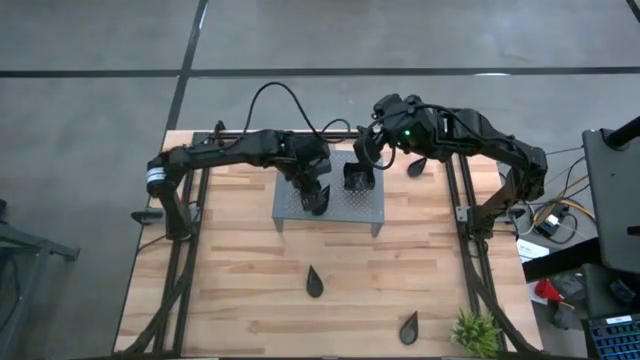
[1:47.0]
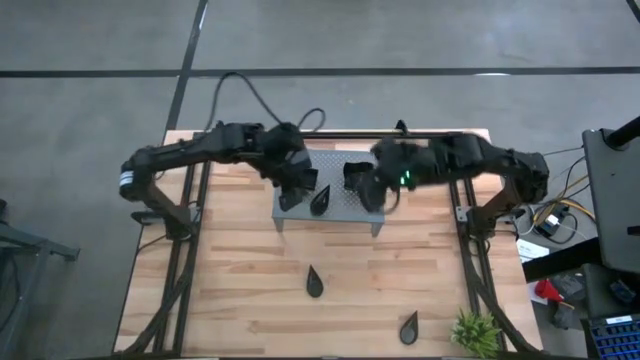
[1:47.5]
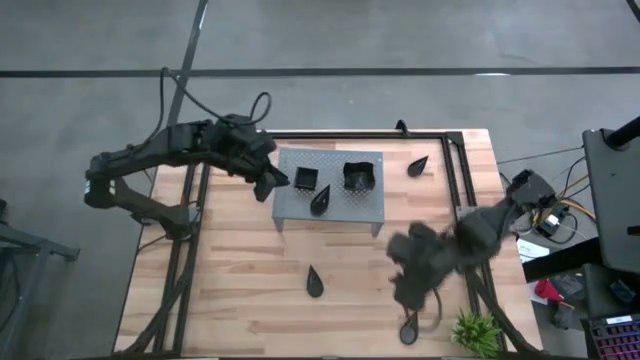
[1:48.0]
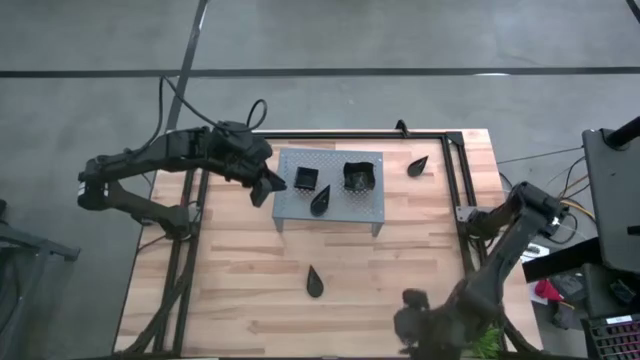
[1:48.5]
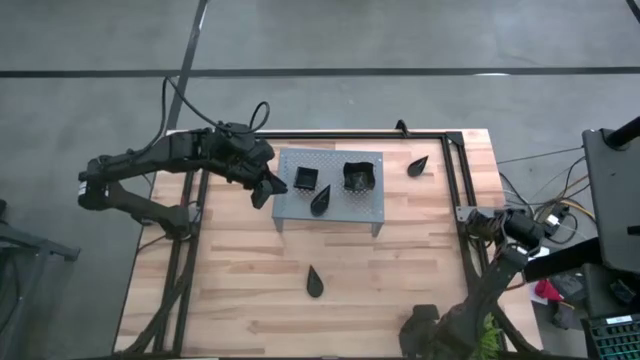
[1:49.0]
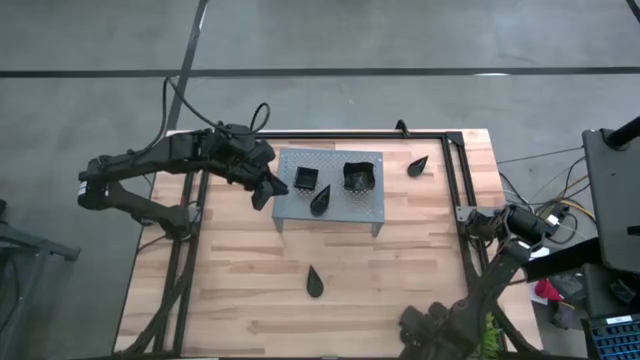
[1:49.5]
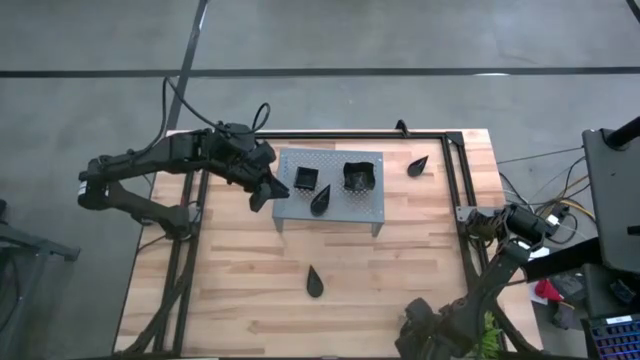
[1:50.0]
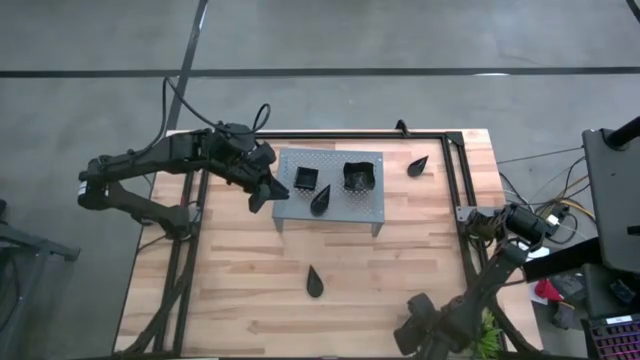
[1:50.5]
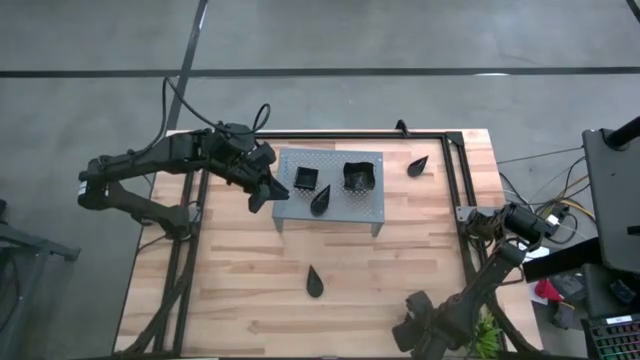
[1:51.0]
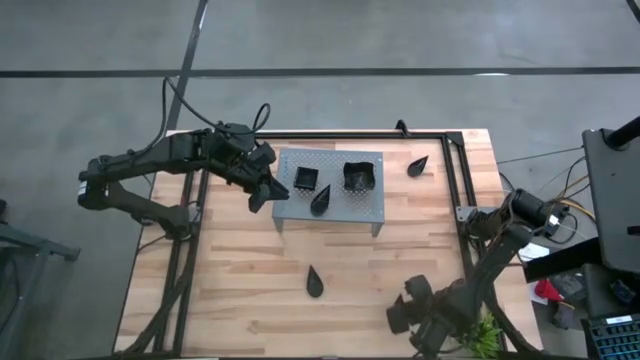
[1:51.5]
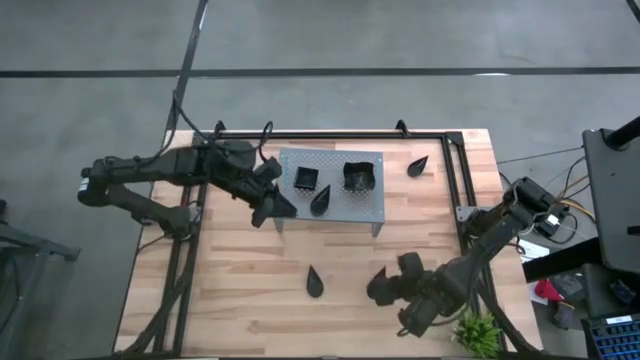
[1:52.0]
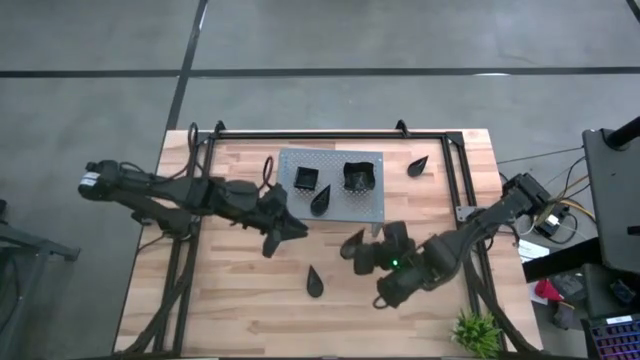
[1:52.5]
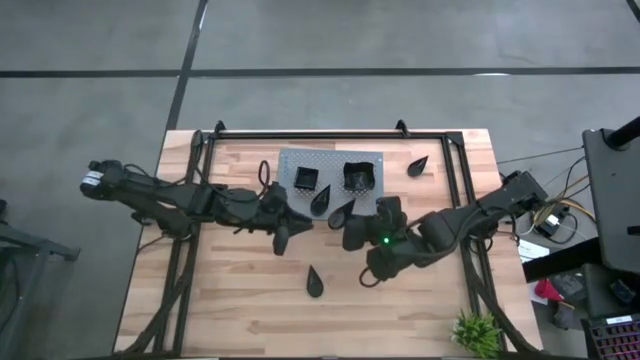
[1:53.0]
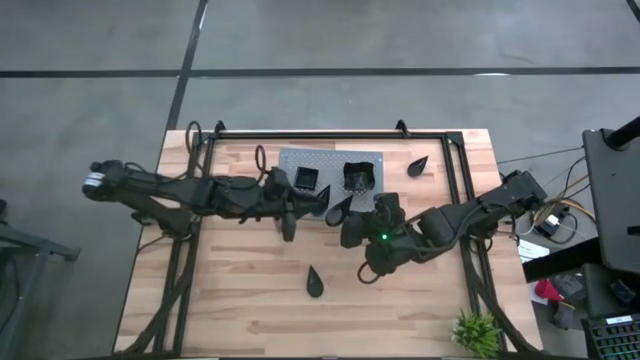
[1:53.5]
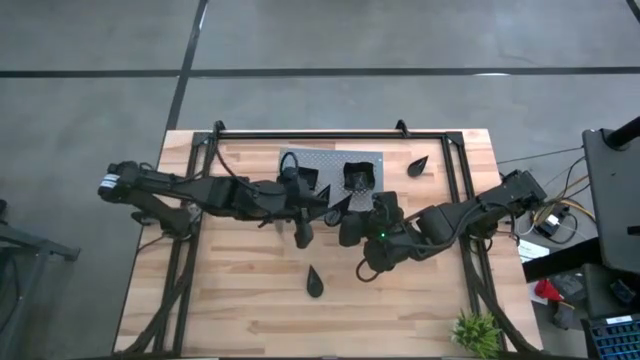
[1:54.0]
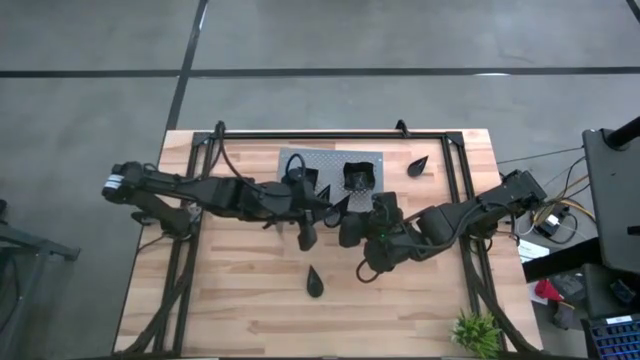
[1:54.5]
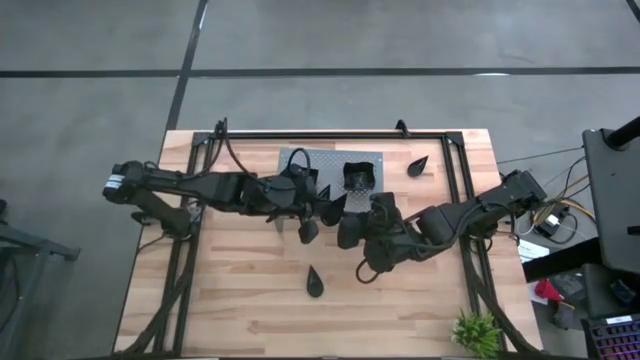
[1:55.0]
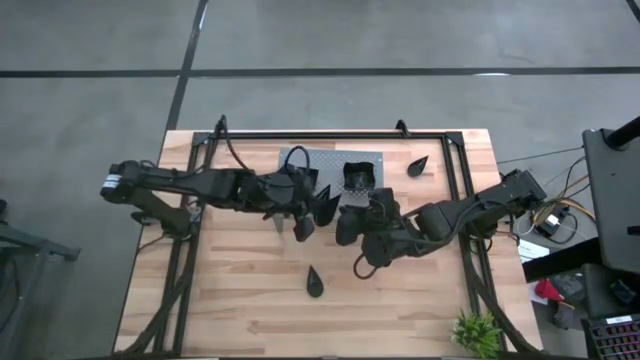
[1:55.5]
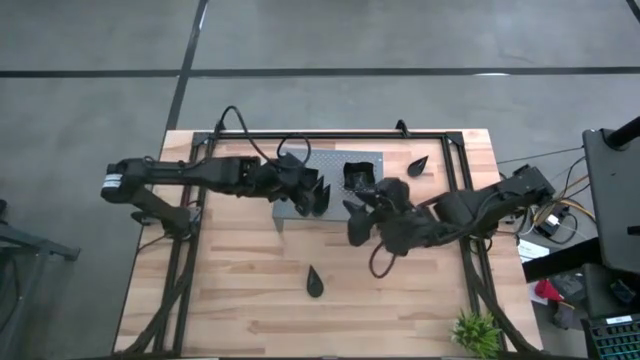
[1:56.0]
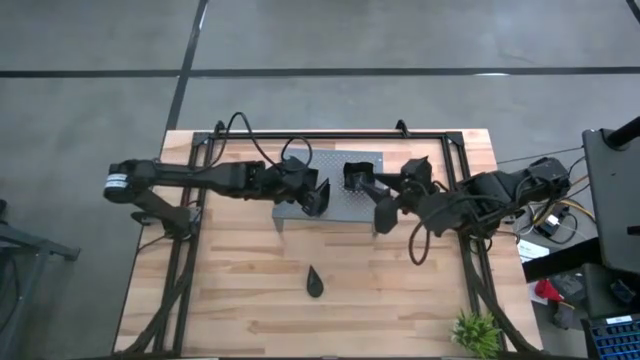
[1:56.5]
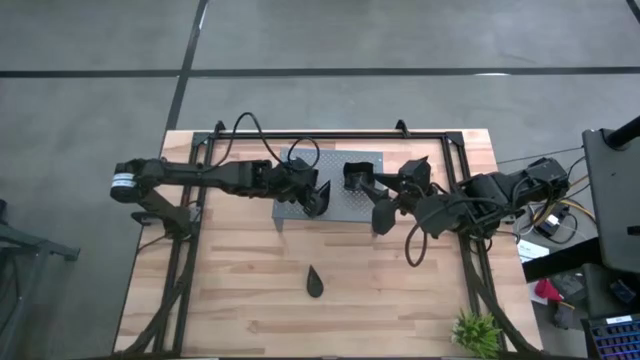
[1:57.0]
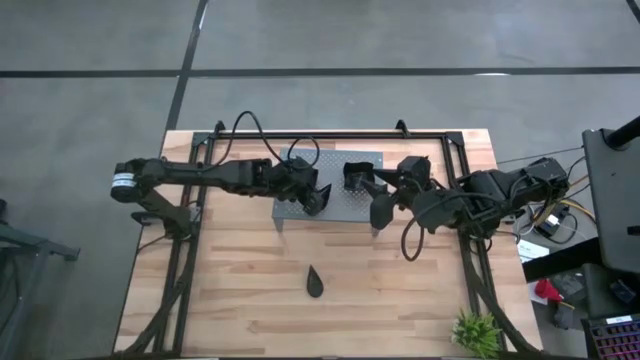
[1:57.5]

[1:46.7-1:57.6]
Task: Pick & Place Mini shaped plates
Stack the black drop shaped plate on top of the other black drop shaped plate on the shelf

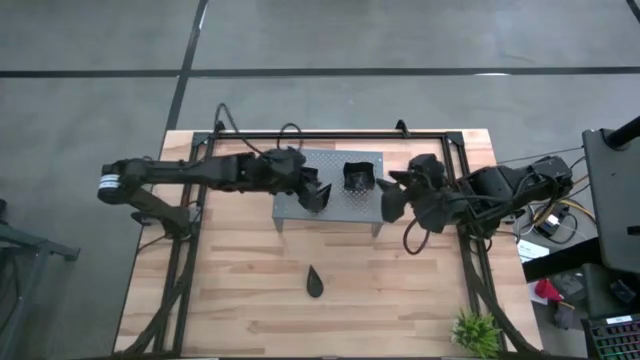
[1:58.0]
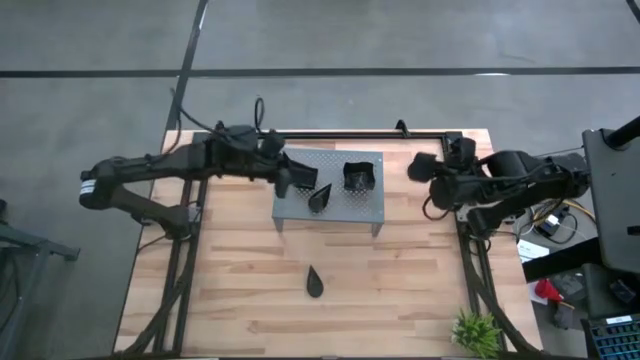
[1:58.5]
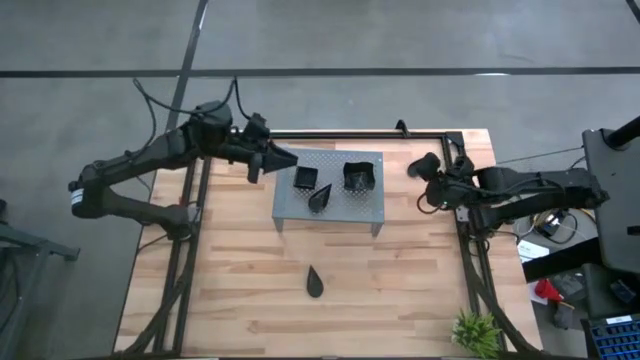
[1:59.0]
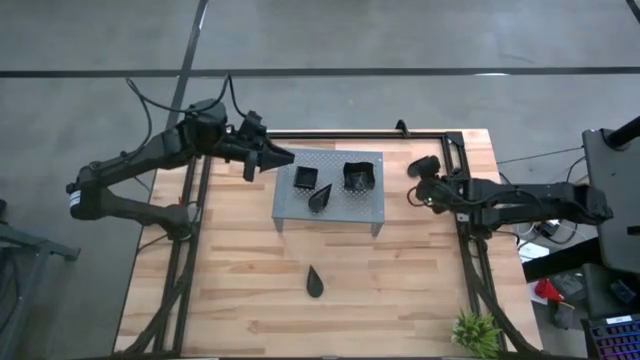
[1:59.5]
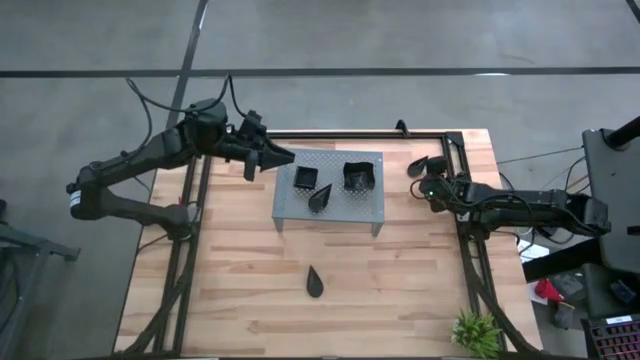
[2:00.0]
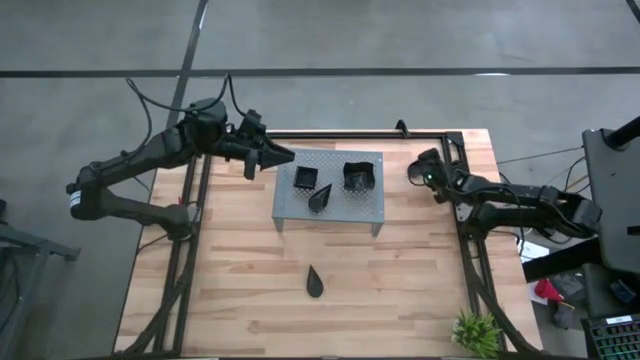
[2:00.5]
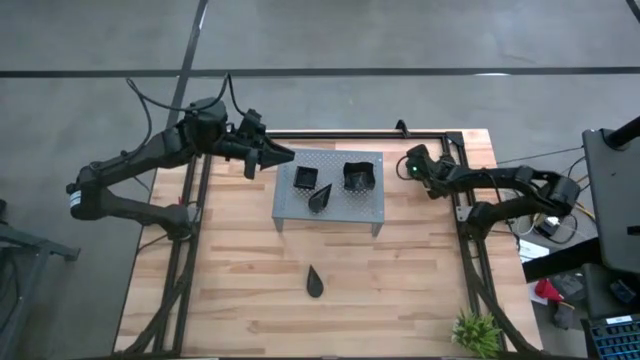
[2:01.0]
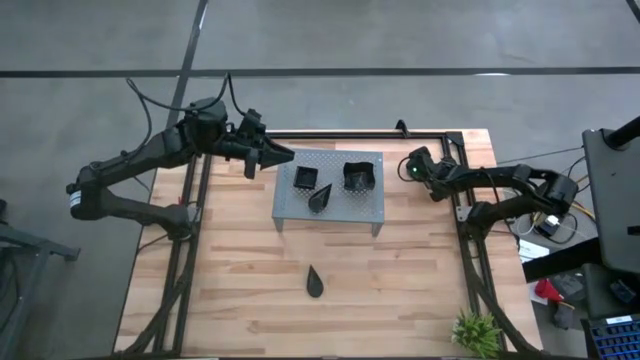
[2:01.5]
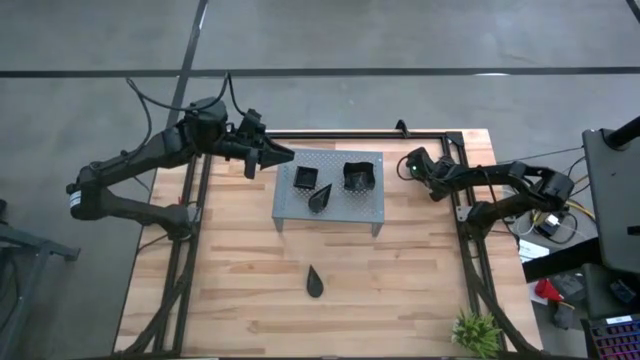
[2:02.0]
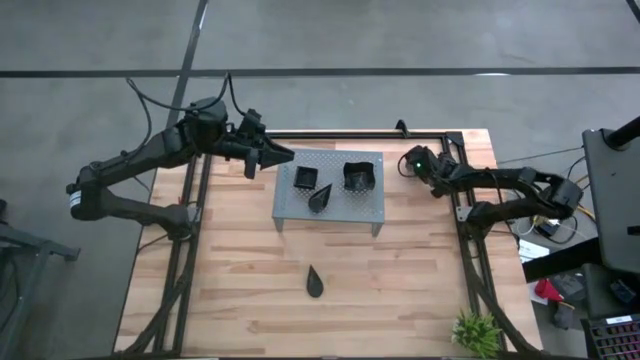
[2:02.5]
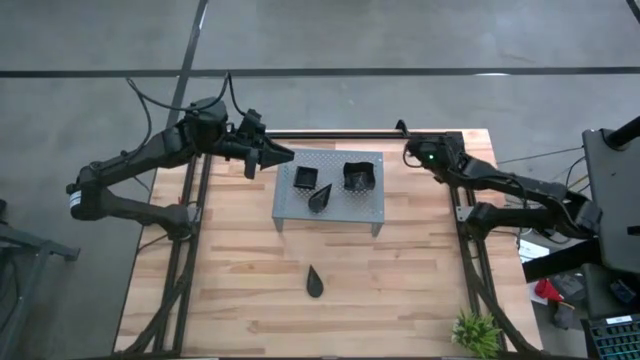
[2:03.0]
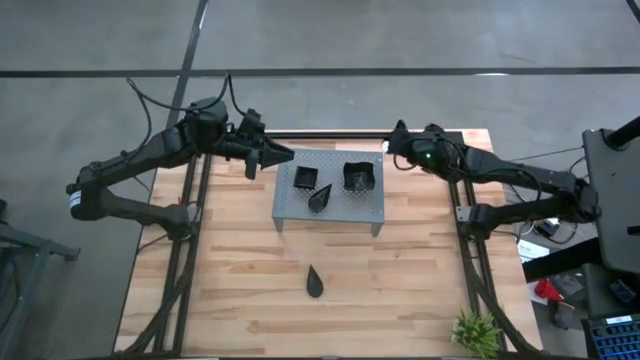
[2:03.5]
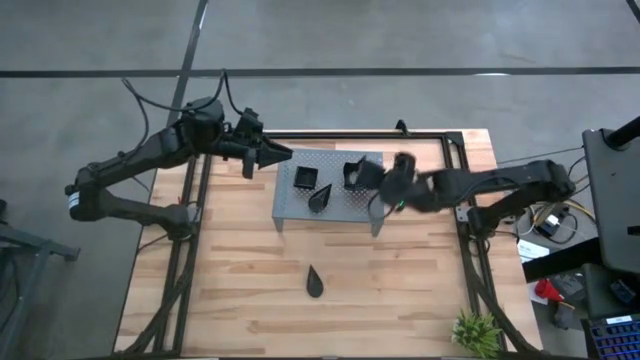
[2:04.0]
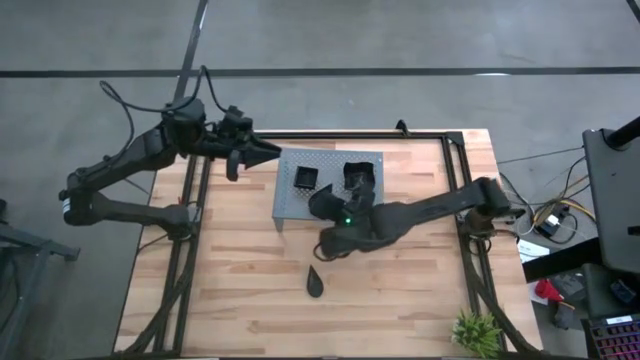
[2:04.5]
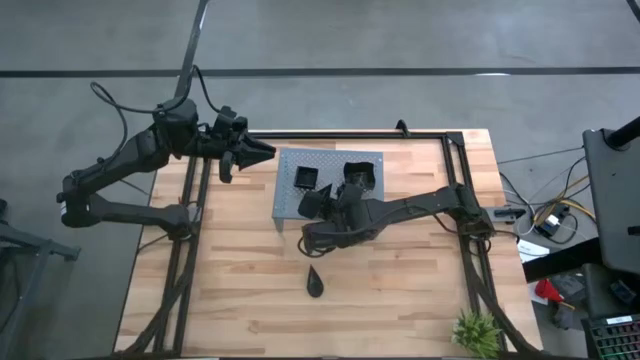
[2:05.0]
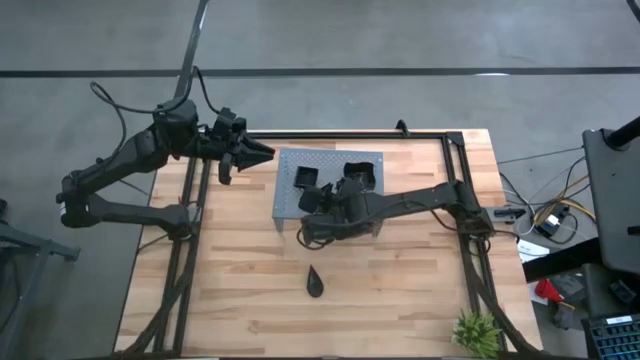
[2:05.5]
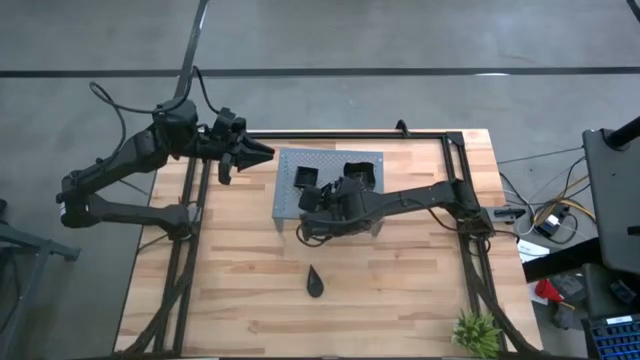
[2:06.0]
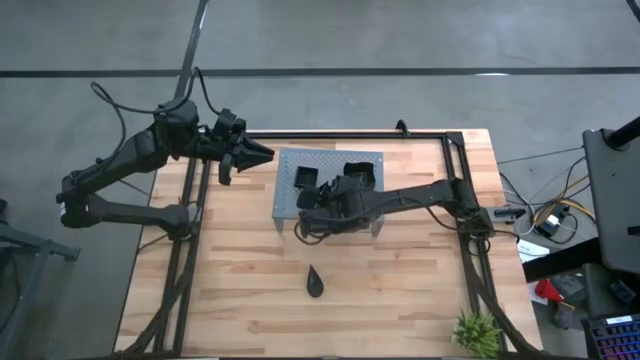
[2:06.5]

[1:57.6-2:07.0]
Stack the black drop shaped plate on top of the other black drop shaped plates on the shelf

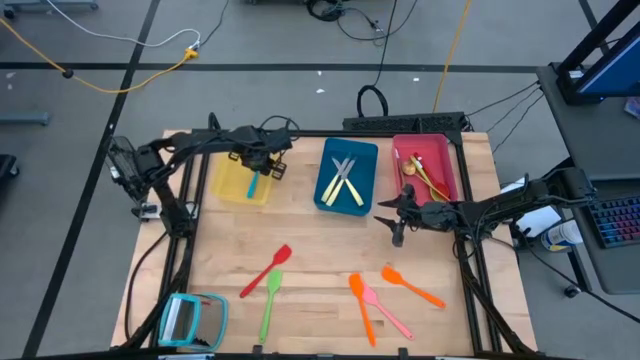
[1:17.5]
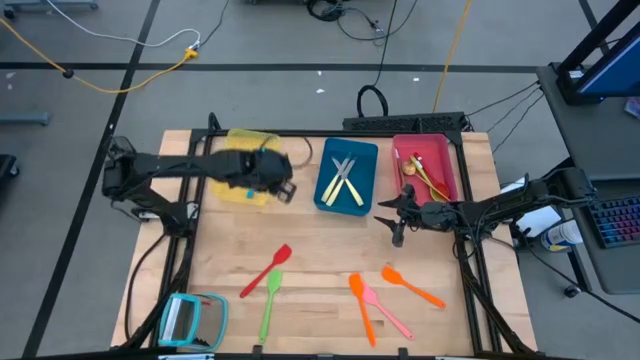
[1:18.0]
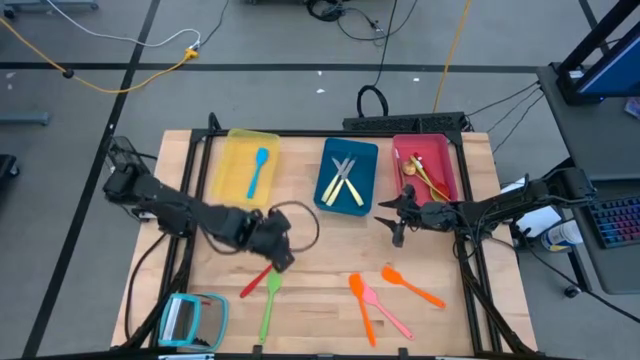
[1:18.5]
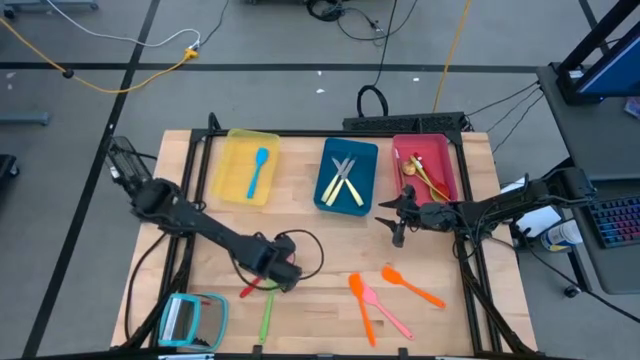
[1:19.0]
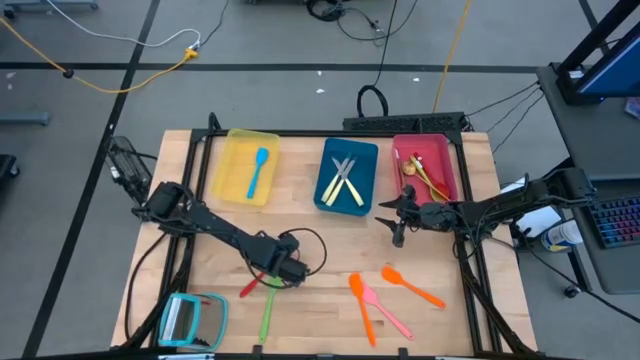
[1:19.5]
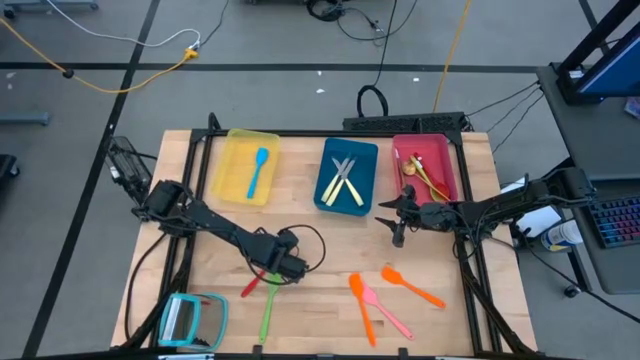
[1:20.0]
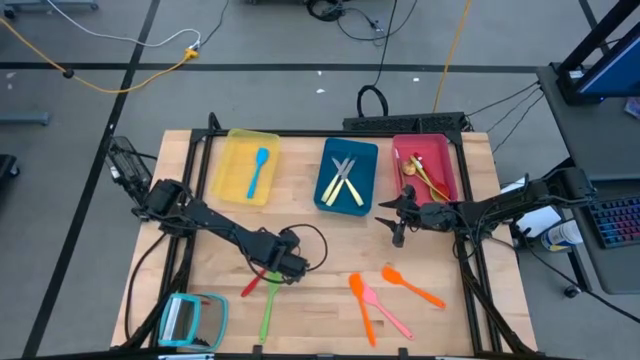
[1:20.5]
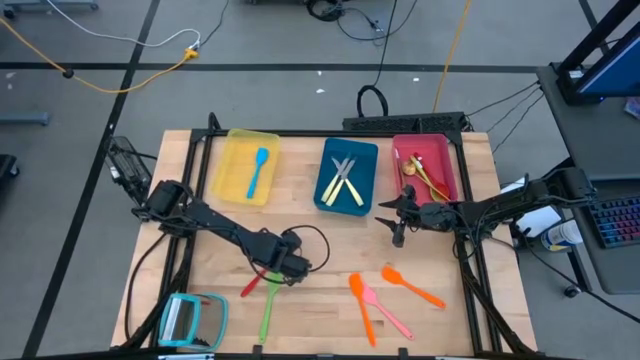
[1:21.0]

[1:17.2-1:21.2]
Task: Pick & Place Kitchen Items
Put the red spatula into the yellow bin
